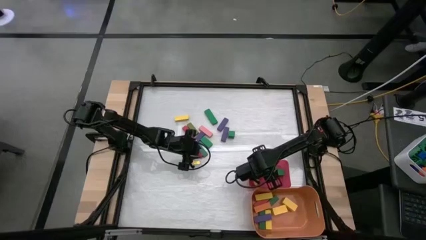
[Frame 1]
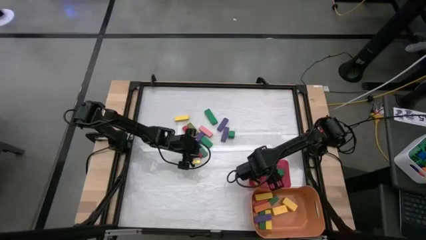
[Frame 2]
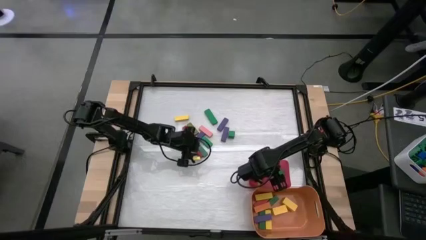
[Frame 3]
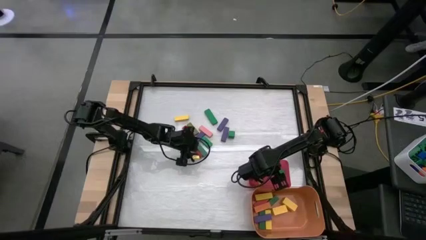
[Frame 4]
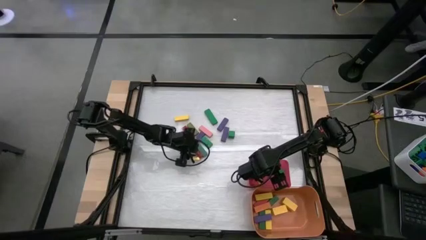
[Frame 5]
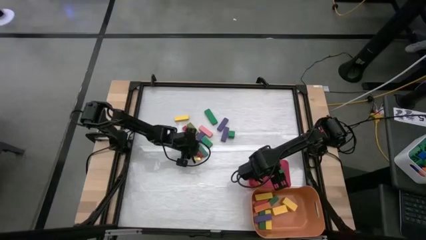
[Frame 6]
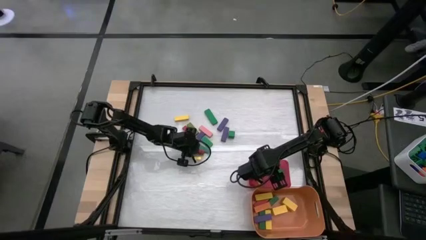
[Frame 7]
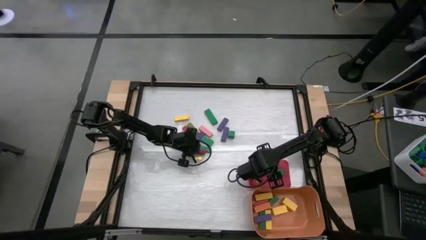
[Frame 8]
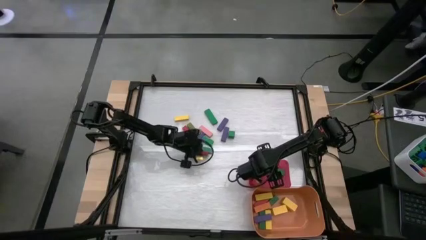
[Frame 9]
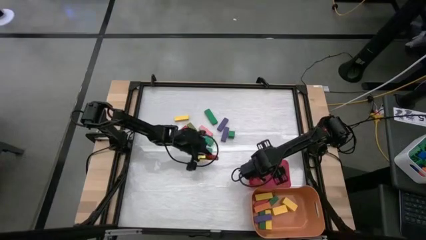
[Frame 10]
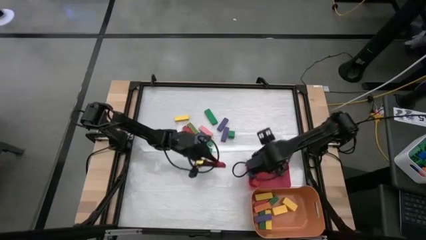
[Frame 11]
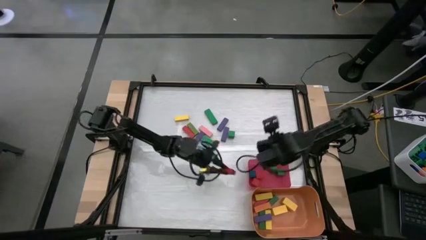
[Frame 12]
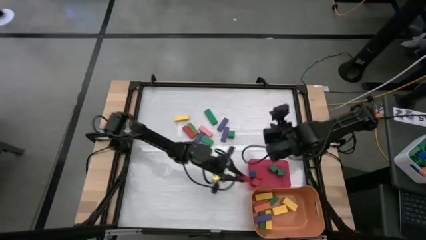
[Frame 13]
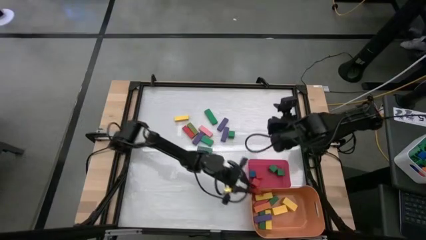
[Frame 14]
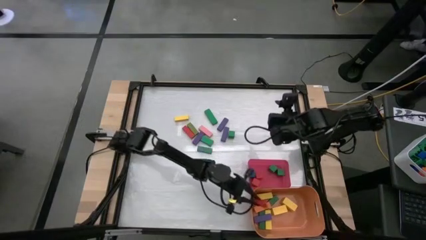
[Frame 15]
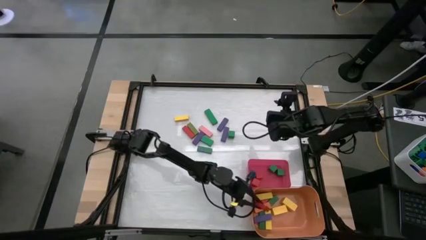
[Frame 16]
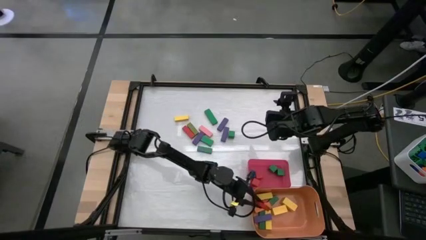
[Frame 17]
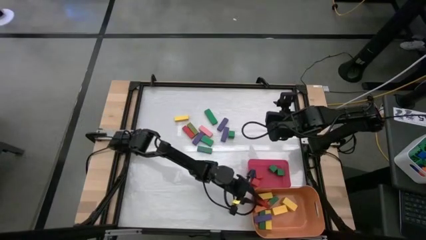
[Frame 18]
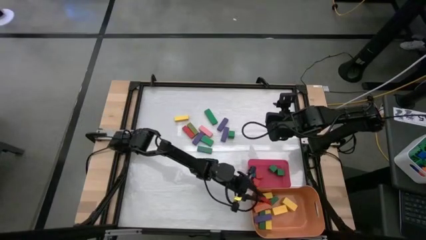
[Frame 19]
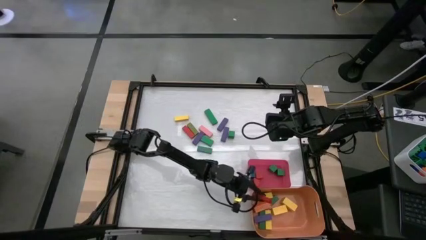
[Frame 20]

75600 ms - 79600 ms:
Task: Sort blocks by size
Put the red rectangle block into the orange bin

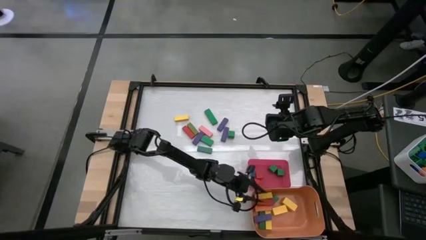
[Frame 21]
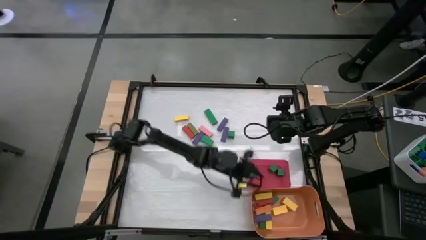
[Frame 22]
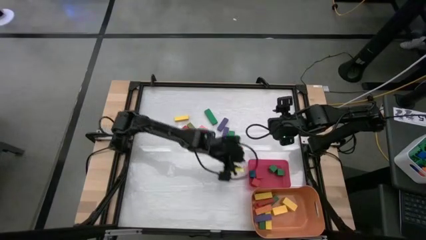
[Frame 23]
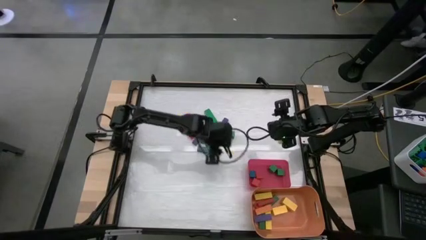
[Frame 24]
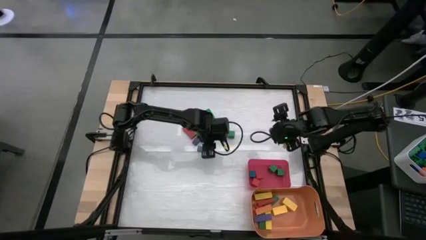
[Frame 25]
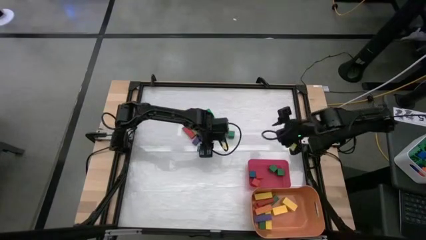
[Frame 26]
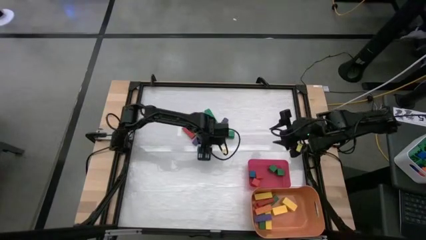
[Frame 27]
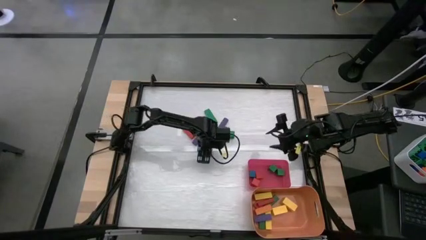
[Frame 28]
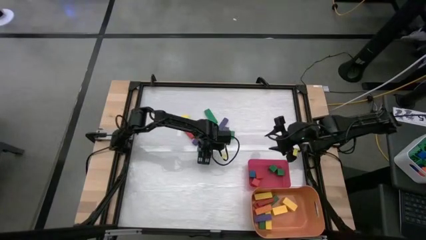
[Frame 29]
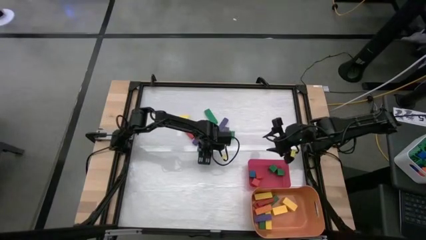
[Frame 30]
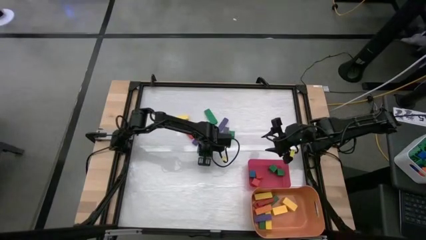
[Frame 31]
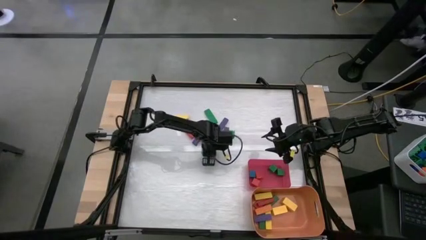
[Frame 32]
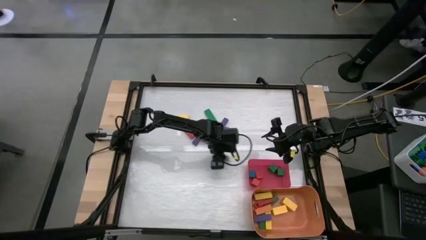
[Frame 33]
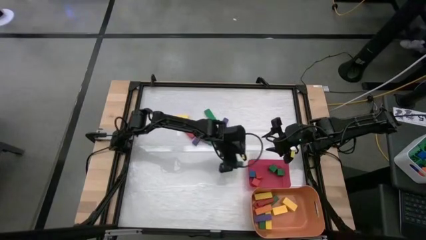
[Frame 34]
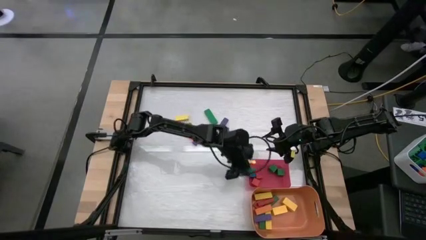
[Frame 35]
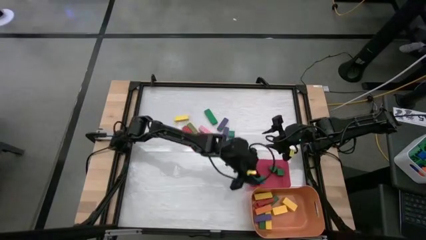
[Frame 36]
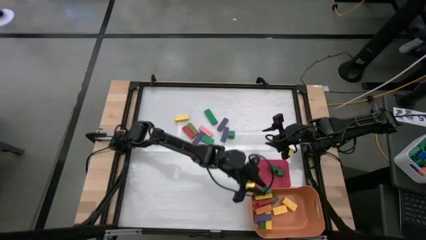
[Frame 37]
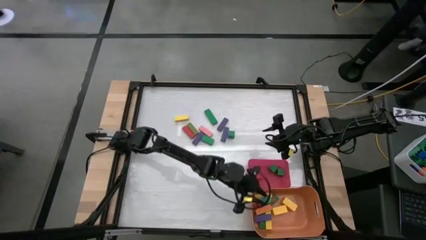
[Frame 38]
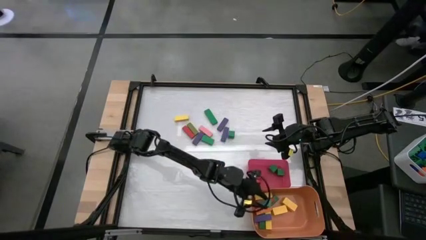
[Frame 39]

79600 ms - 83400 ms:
Put the green rectangle block into the orange bin

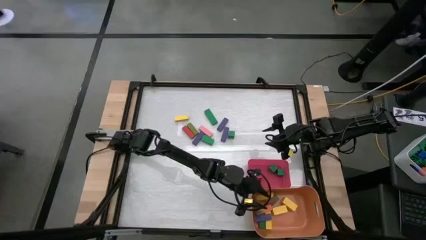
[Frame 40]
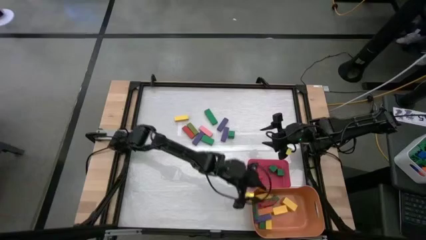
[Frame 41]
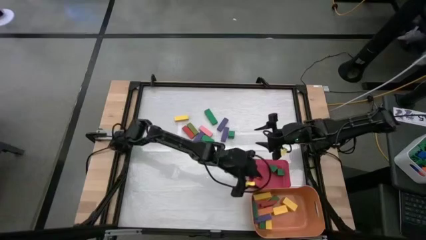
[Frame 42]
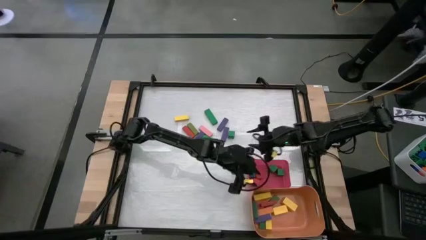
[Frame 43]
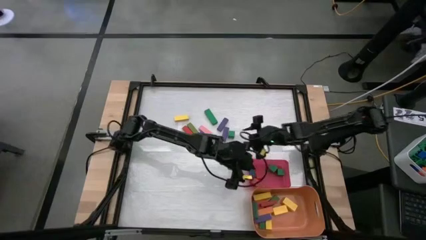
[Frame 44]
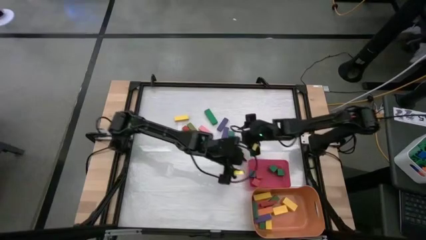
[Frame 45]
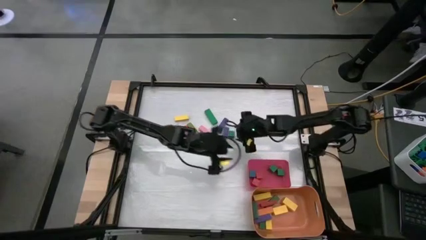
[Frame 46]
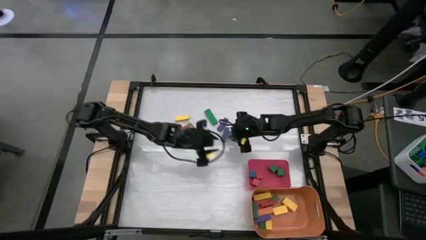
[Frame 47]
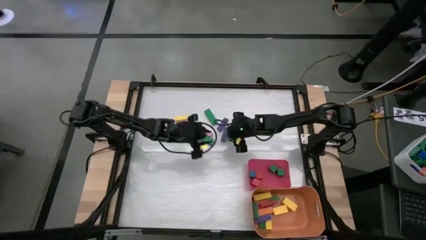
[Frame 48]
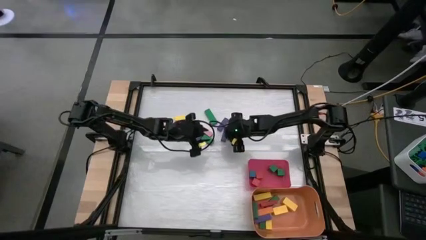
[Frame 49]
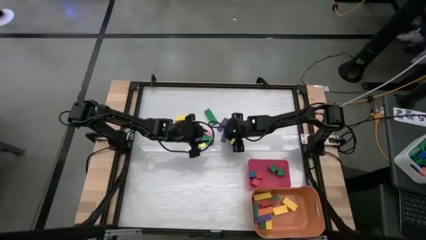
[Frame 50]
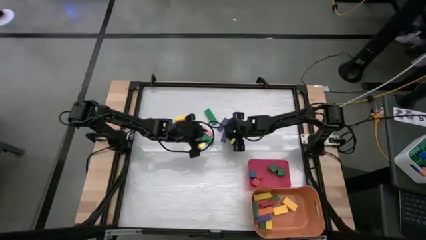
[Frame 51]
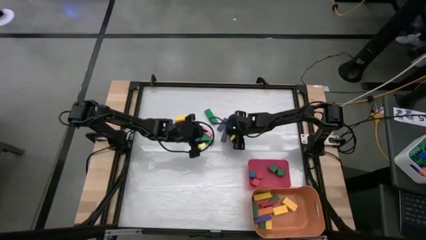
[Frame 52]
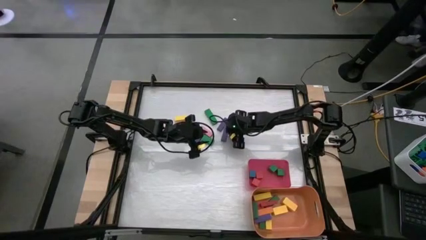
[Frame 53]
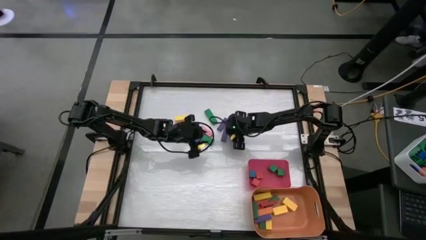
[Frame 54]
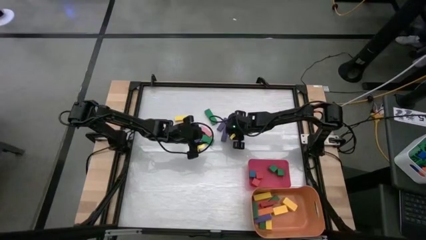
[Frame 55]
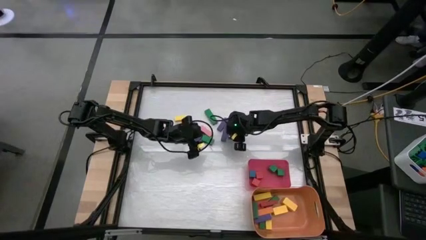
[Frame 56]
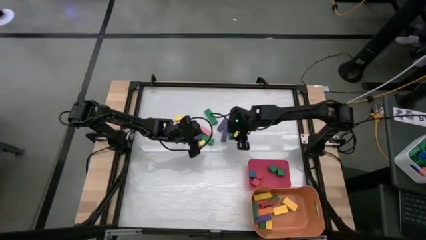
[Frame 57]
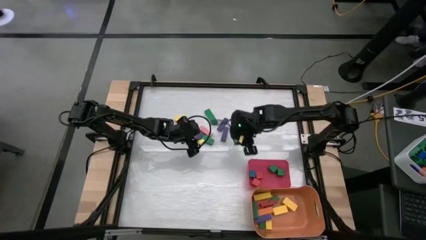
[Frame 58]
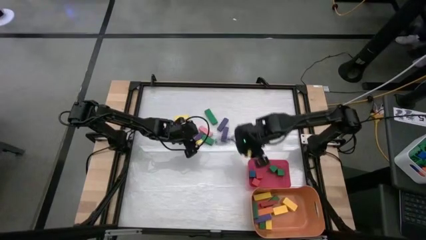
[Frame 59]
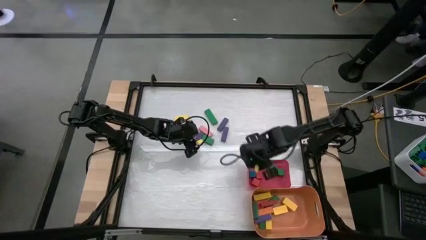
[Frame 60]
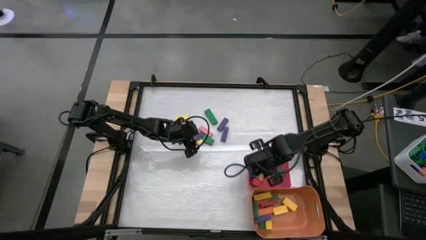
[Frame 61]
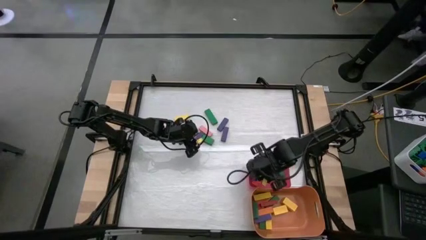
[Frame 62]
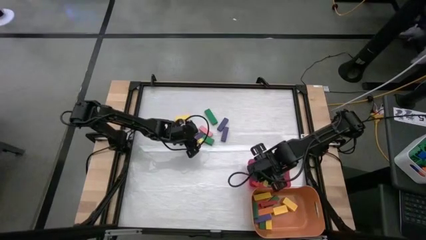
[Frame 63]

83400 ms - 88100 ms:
Put the green square block into the pink bin

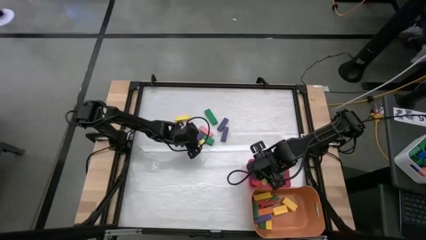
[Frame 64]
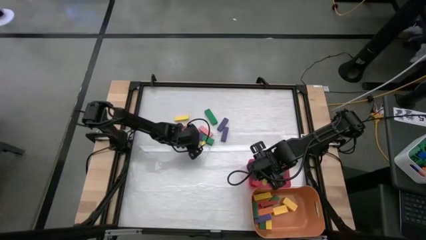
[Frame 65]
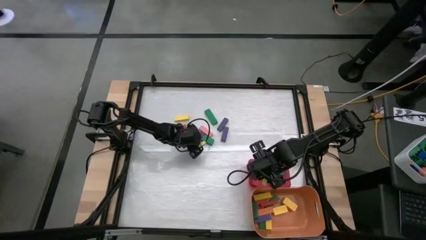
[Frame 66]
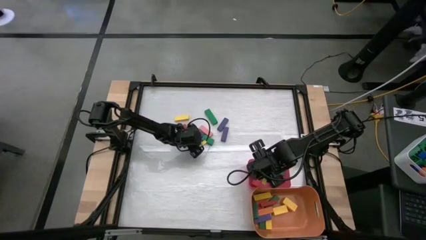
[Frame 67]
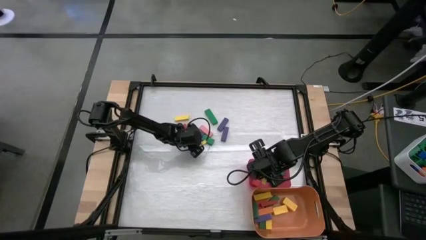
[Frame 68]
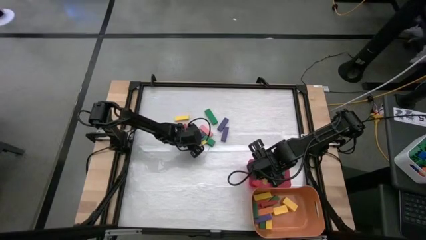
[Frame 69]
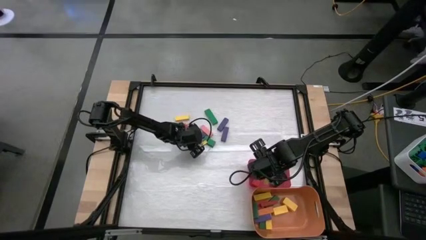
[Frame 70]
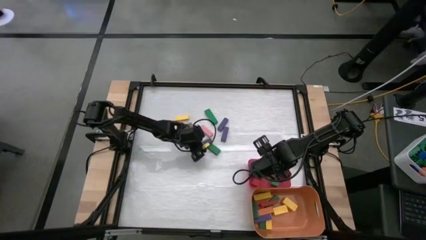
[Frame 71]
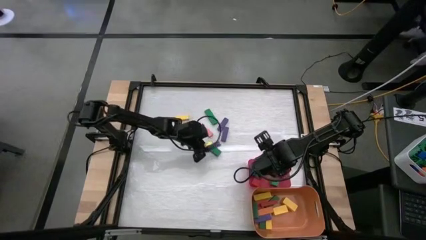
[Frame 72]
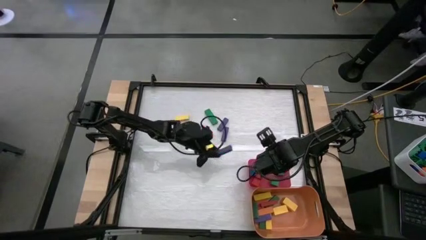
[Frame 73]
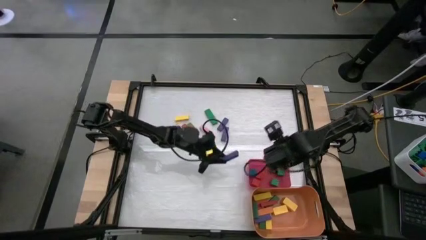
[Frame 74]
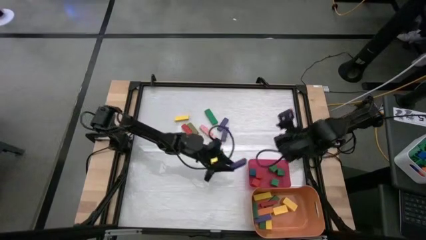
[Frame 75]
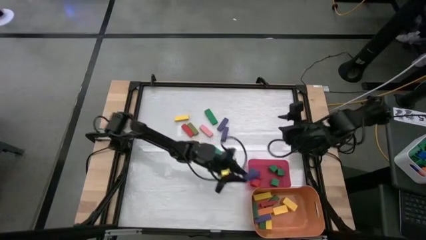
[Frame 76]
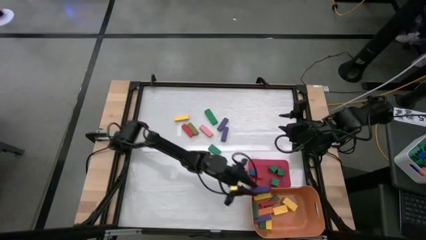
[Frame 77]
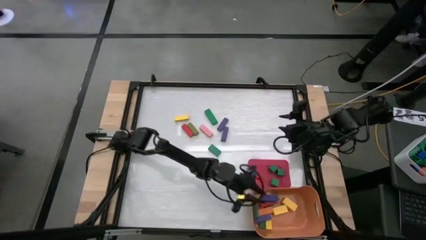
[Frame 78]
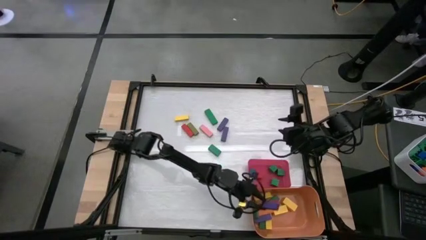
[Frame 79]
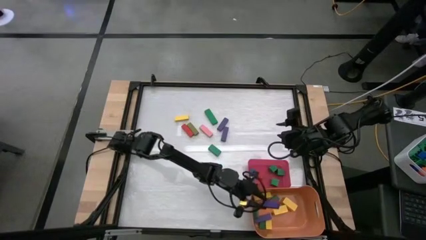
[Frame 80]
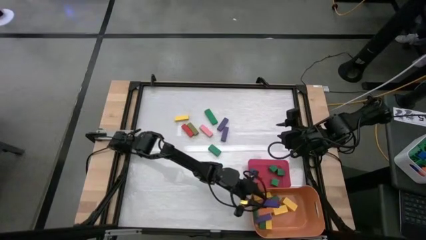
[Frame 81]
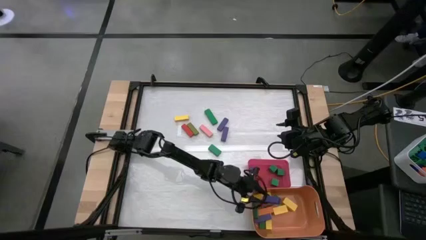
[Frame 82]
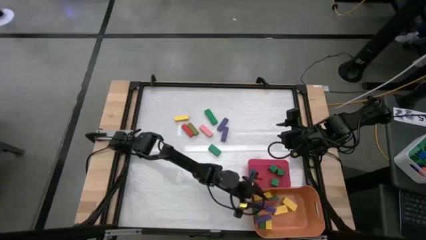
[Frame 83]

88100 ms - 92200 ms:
Put the violet rectangle block into the orange bin

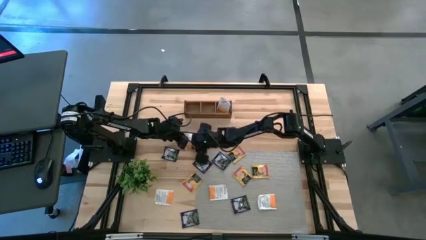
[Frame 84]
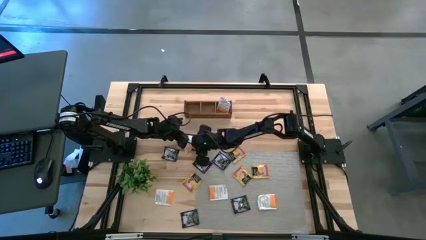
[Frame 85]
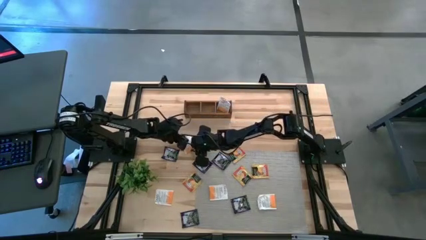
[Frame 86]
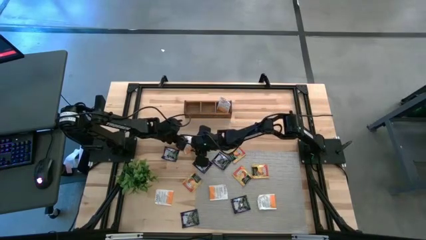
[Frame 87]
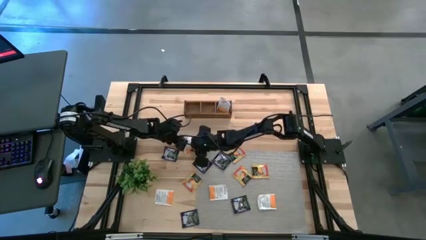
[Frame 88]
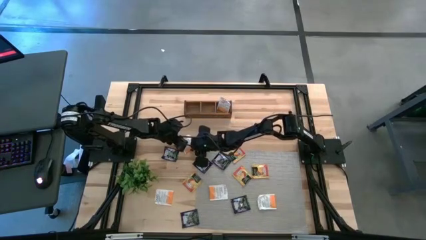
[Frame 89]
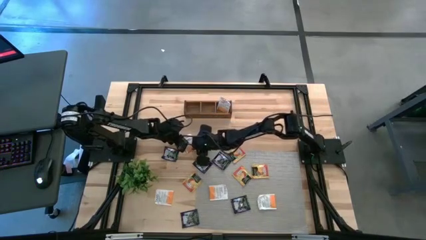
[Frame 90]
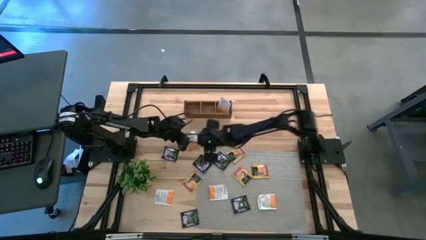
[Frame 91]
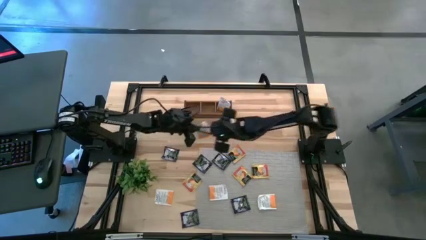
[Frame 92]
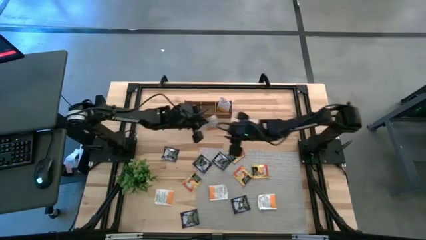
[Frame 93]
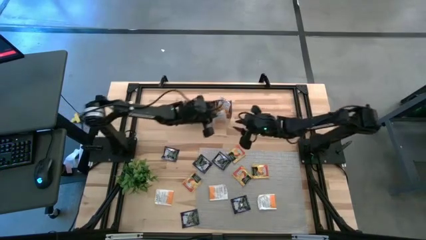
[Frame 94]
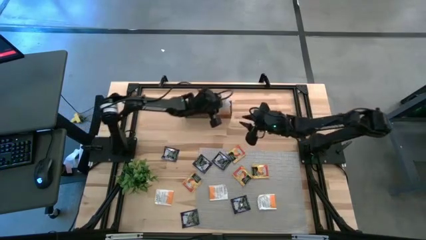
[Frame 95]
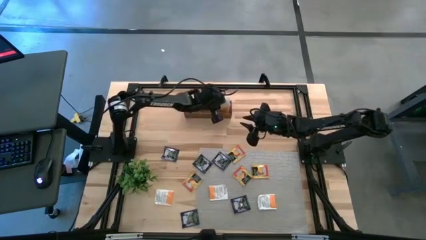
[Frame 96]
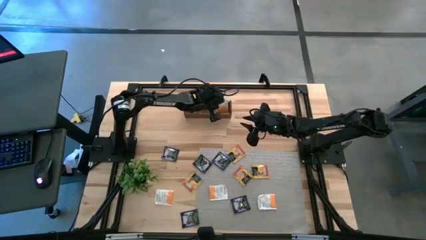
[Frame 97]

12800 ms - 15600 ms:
Task: Pick & Place Tea
Put the white tea bag into the right section of the wooden organizer
